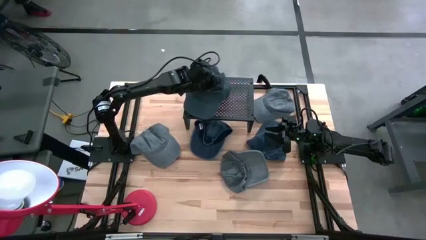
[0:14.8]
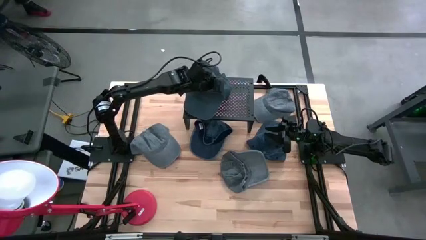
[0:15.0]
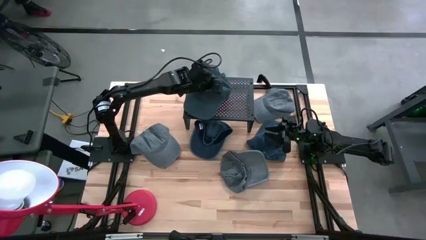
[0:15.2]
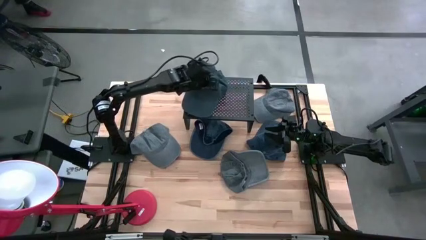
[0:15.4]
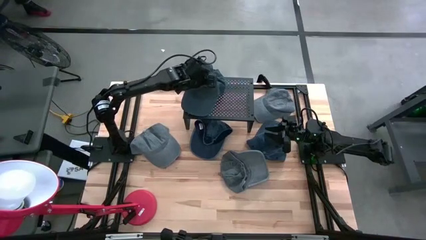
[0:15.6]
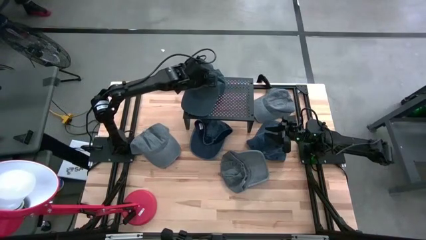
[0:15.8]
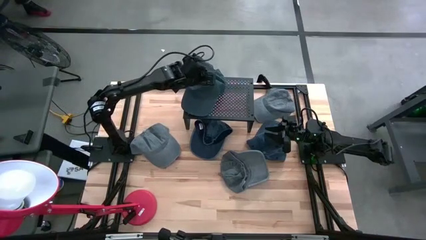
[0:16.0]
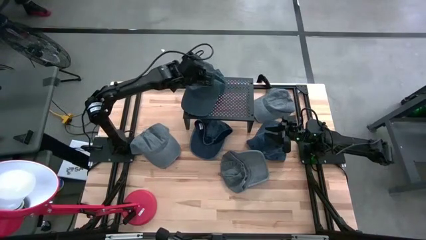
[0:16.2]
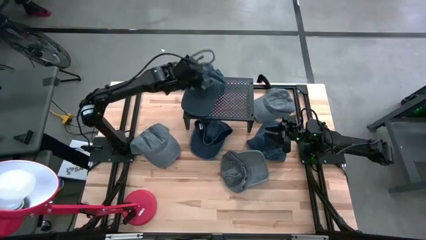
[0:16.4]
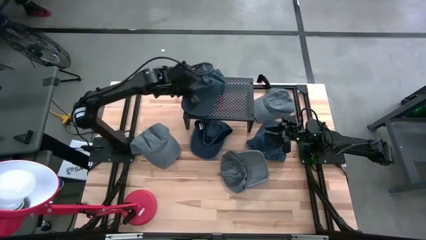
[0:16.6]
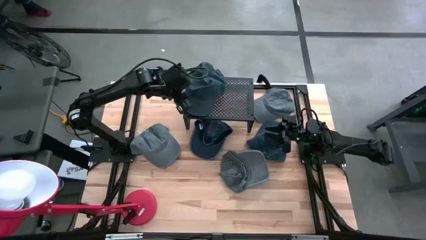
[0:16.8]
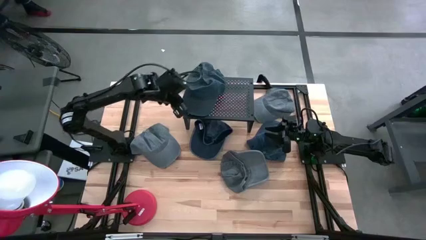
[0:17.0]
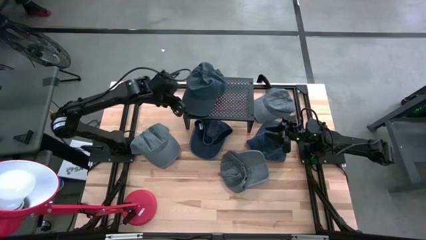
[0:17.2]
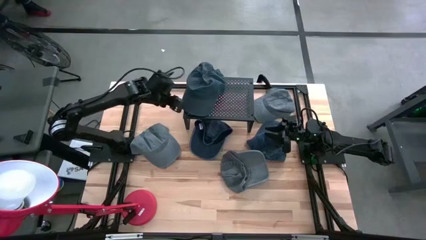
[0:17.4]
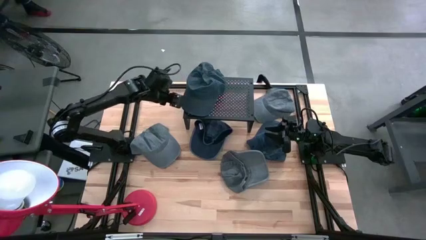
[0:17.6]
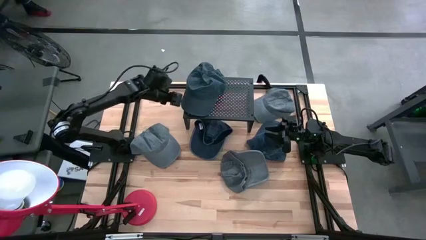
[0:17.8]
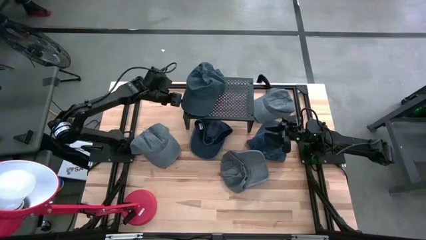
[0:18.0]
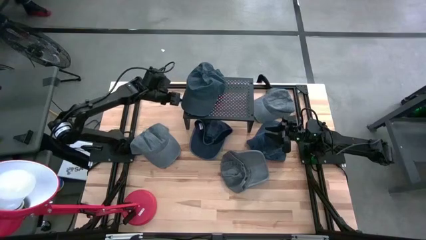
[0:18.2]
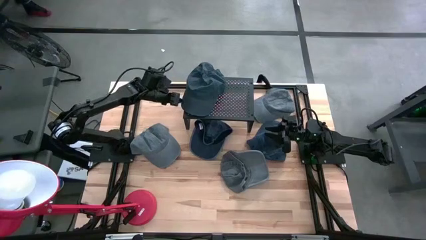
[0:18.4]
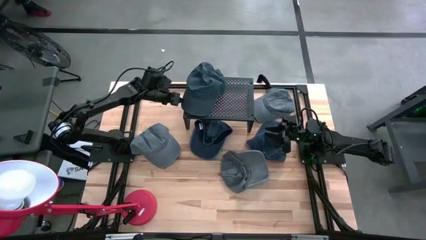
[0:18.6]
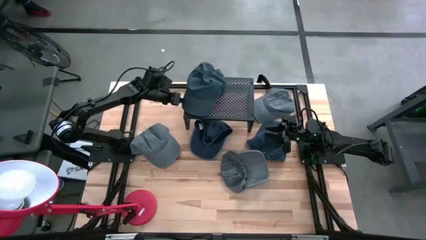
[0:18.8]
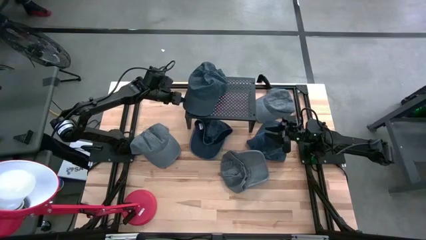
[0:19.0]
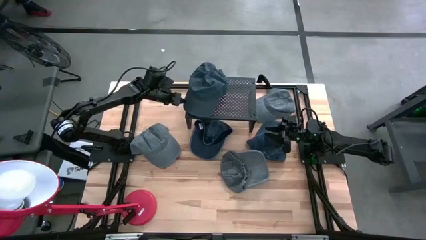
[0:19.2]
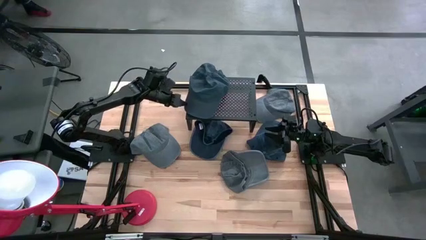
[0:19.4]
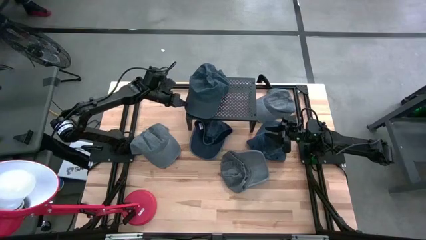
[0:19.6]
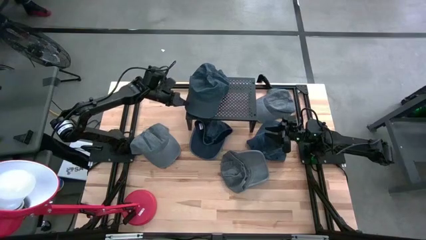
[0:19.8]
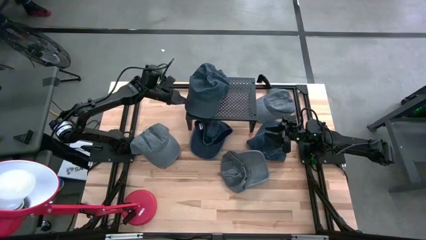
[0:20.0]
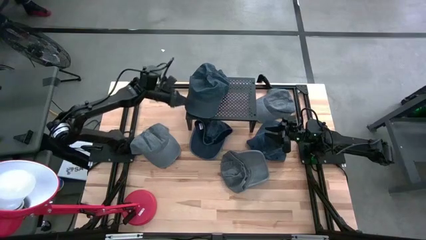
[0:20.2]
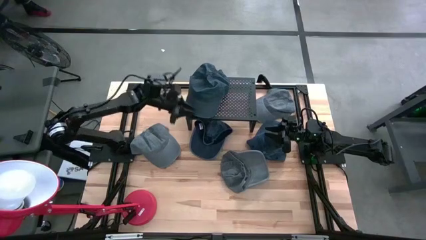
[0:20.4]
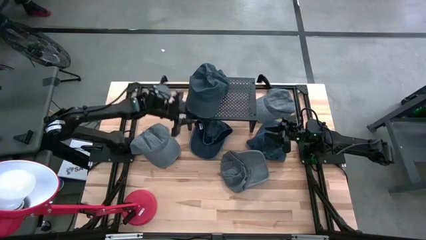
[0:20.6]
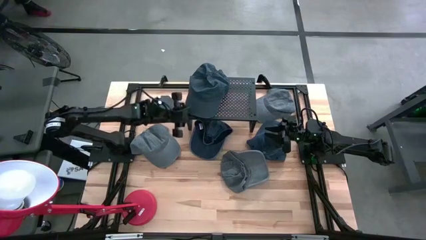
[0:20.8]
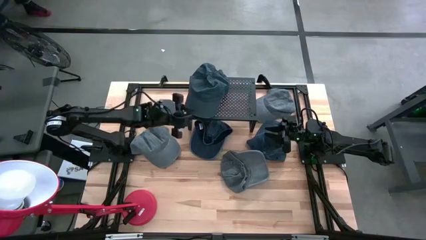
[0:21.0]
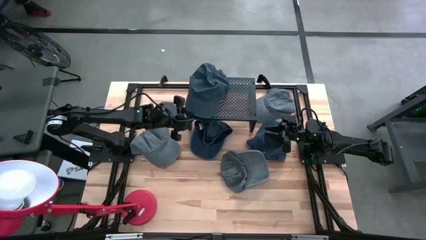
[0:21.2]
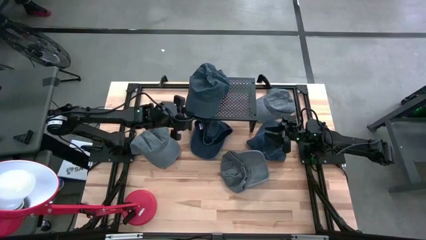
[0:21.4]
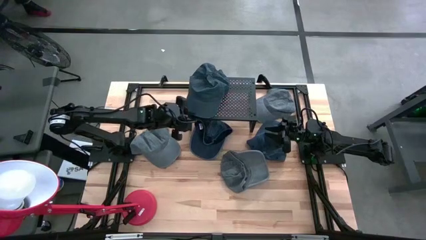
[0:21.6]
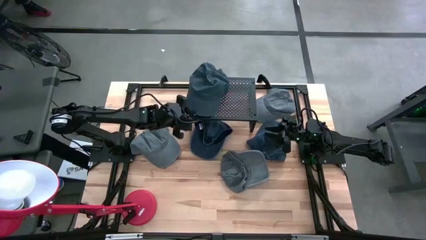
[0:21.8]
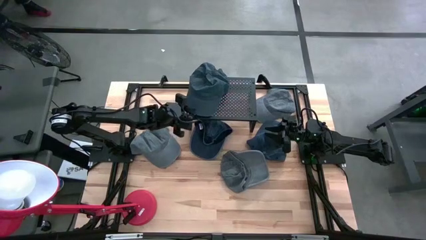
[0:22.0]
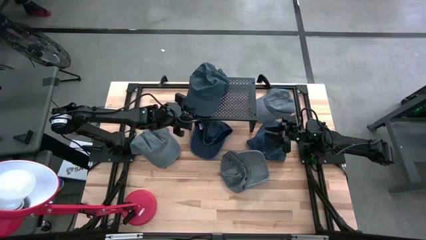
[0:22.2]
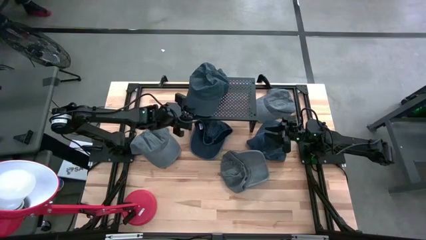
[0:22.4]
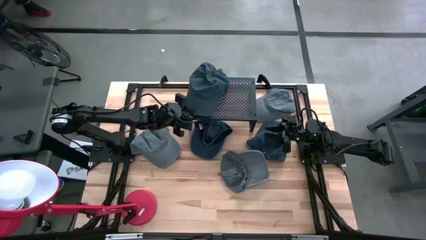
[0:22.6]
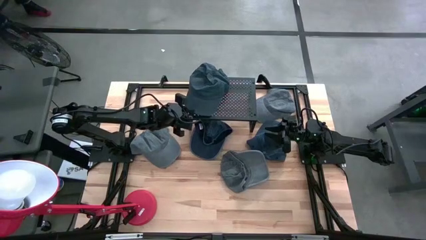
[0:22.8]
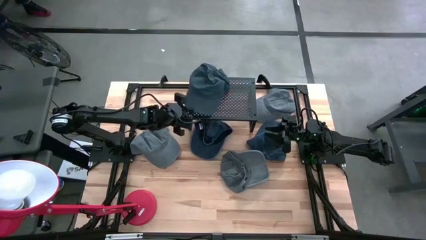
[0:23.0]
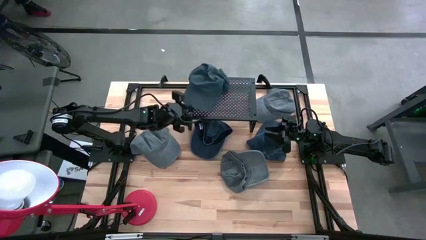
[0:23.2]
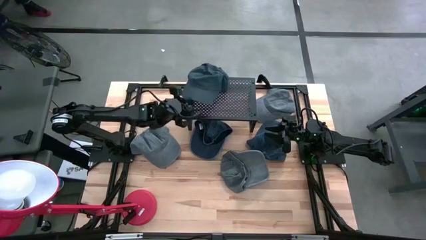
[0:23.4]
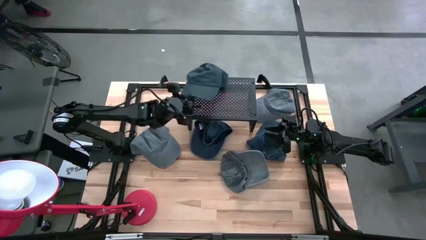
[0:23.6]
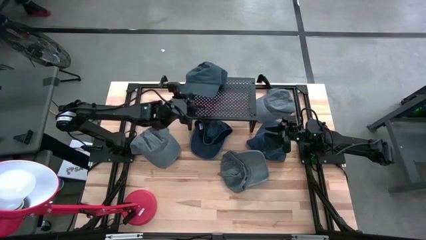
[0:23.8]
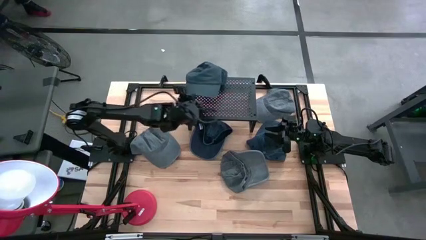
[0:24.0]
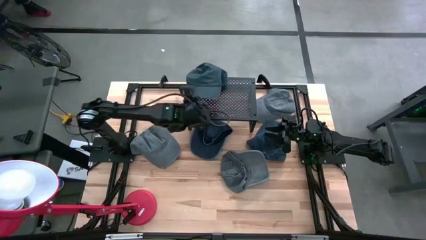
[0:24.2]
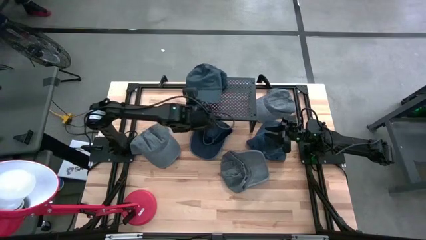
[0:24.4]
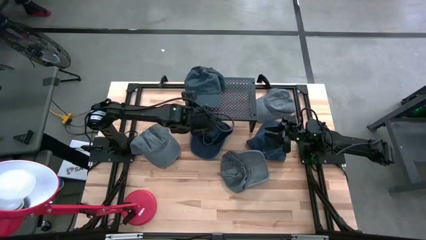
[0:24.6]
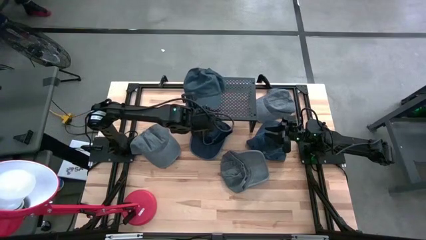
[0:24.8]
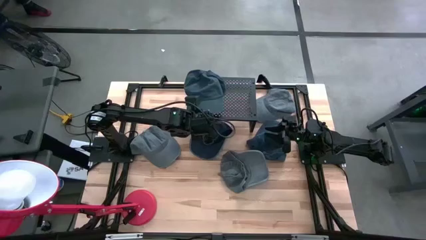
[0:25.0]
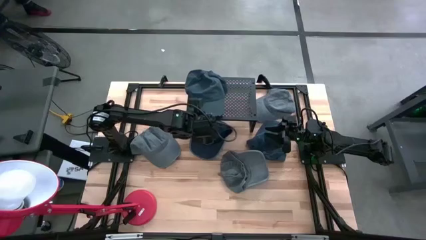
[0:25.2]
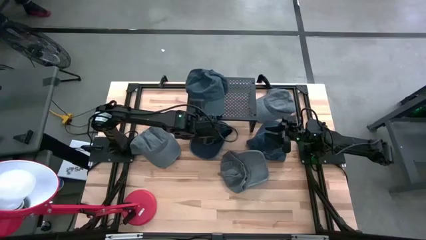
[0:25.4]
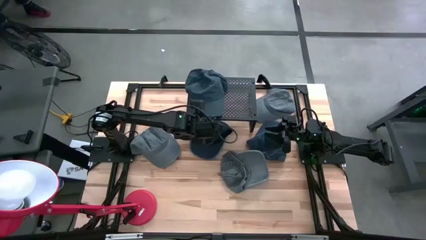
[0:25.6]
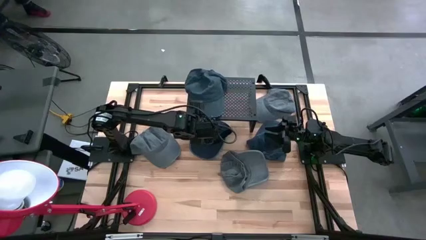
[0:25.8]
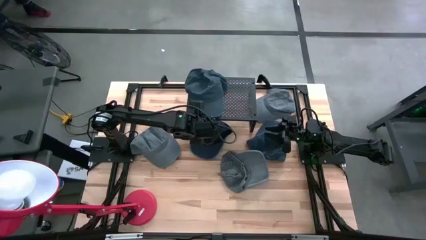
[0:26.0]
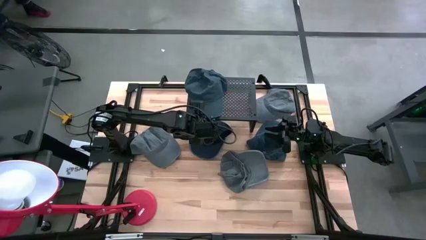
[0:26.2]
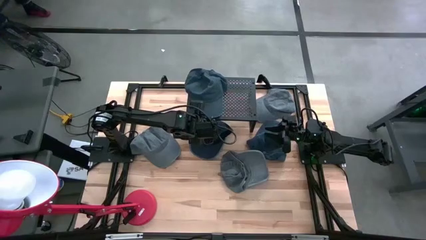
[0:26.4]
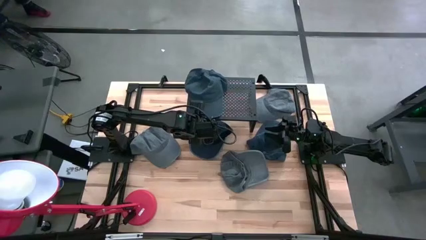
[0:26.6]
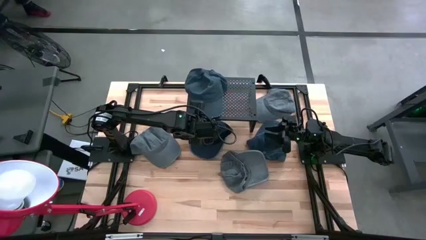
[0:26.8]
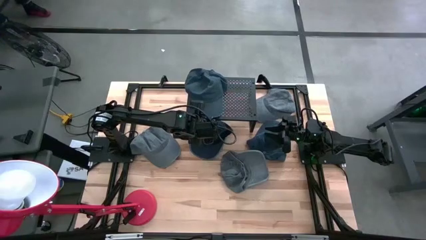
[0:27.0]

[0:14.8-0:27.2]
Task: Pick & Place hat
Put the top blue cap on the shelf

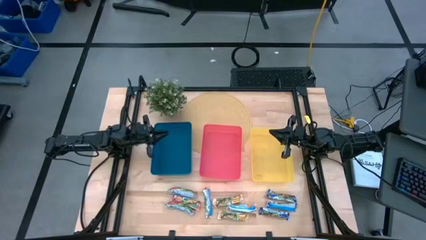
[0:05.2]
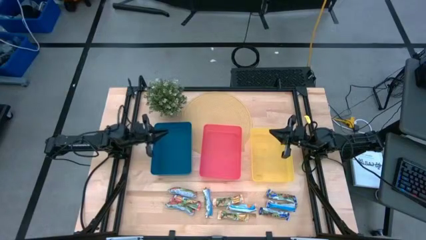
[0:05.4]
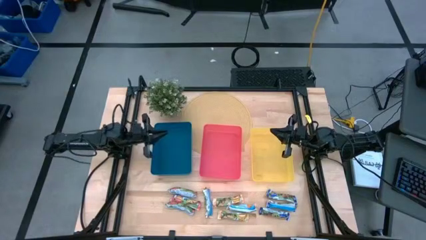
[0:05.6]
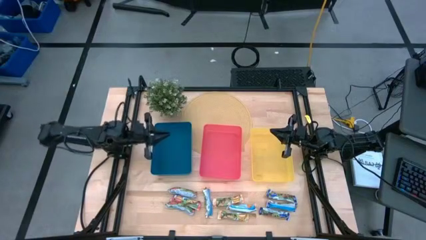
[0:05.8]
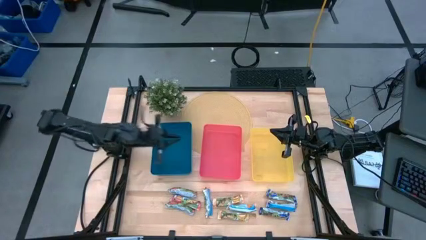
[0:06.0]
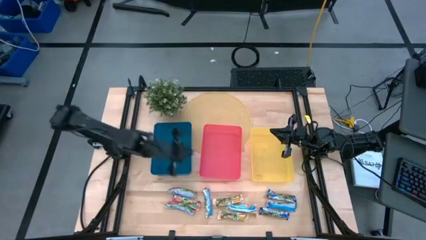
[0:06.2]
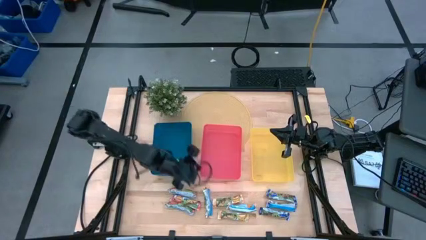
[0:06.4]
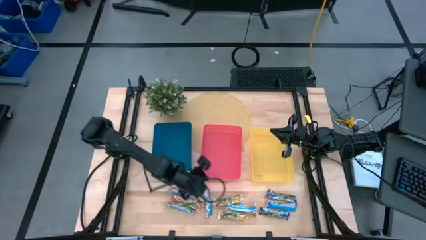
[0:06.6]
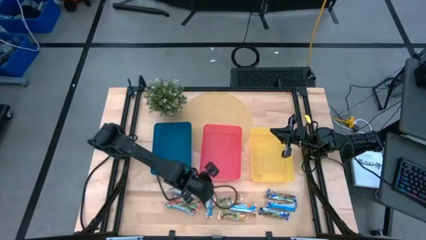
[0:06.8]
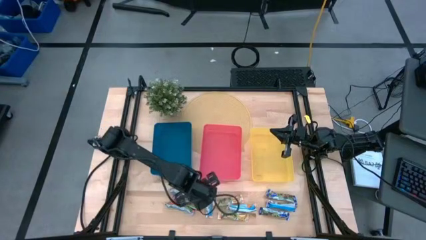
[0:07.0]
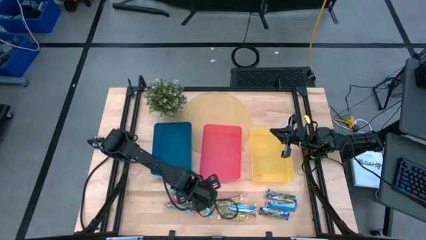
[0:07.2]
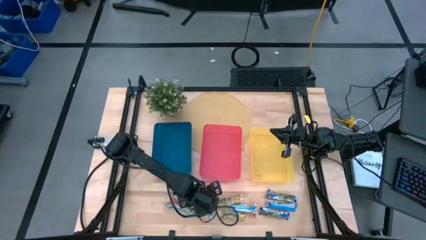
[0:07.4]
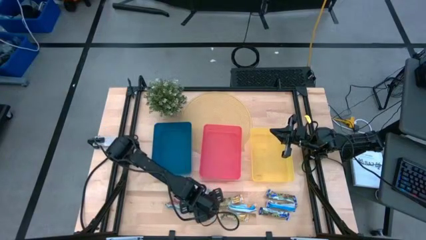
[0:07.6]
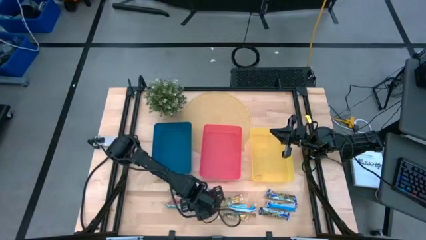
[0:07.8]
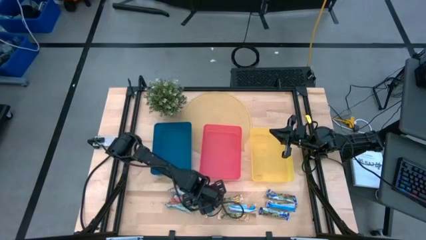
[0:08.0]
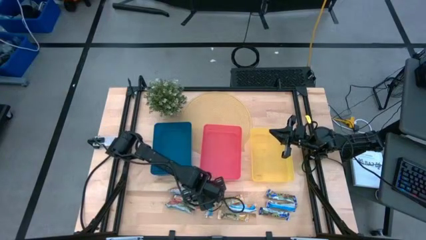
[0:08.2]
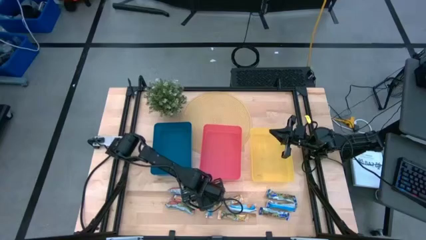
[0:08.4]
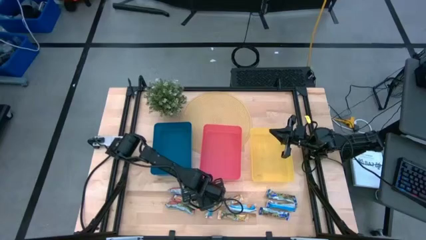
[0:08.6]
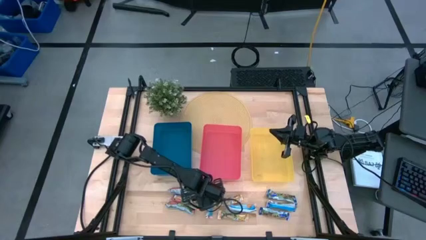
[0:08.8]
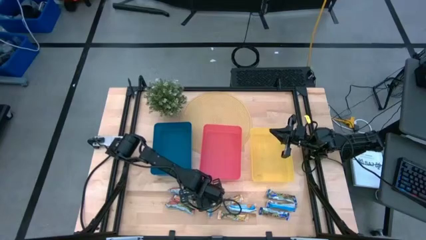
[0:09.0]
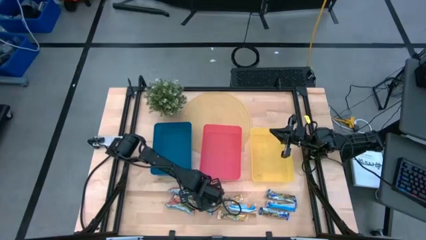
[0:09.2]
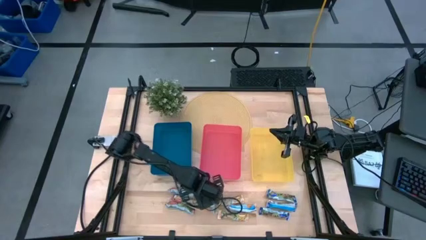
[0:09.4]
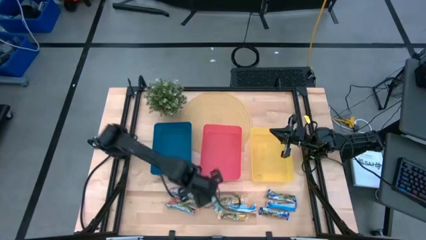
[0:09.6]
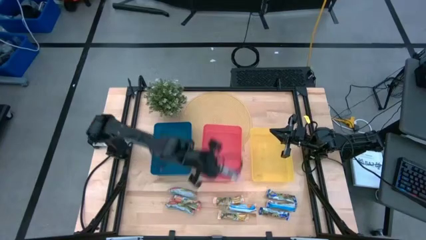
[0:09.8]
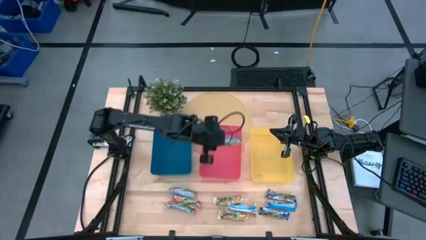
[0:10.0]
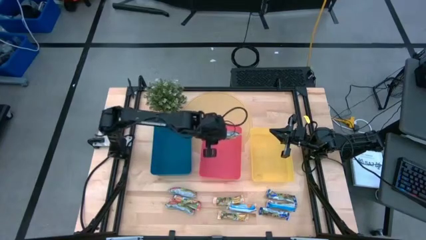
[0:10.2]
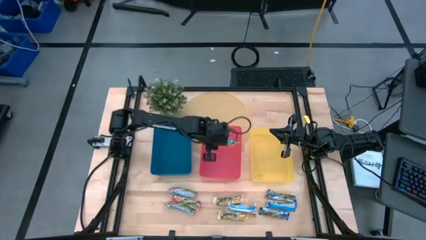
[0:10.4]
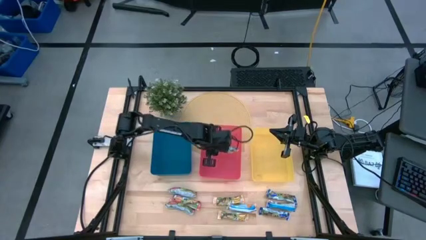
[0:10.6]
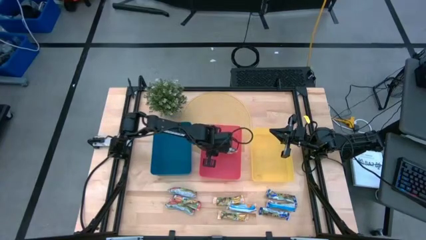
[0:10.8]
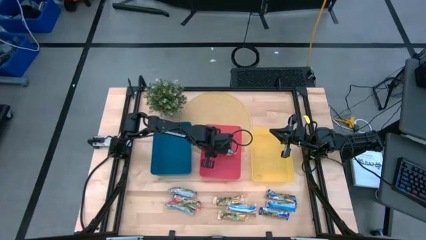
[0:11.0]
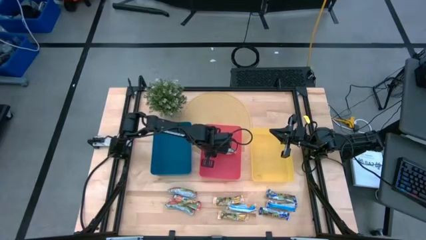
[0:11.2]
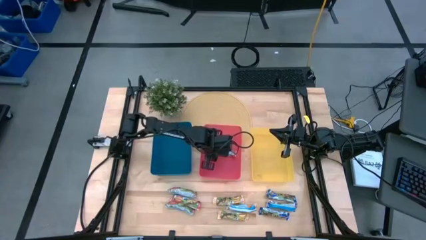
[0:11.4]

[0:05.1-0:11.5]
Task: Pick and place Granola Bars by type
Put the yellow granola bar into the red bin
